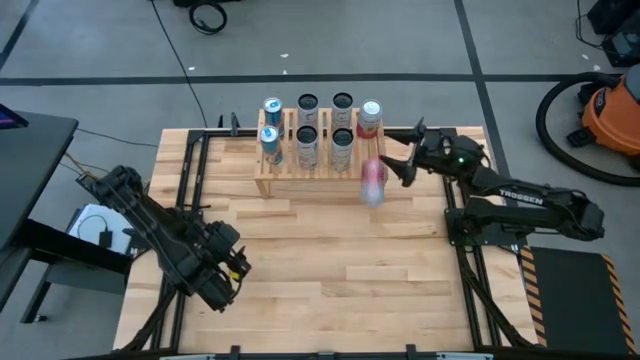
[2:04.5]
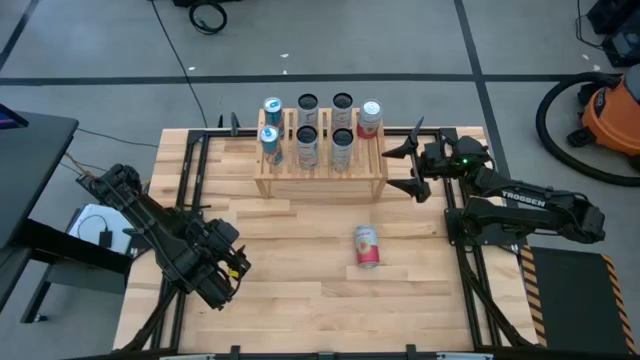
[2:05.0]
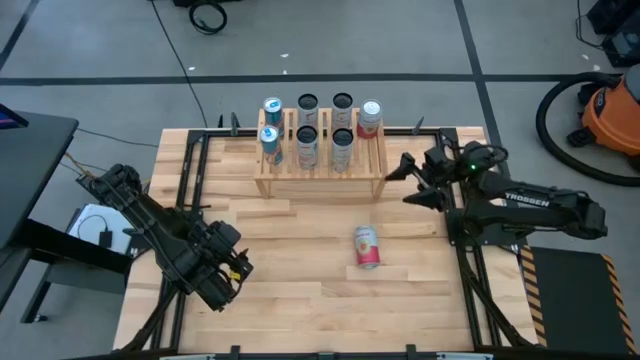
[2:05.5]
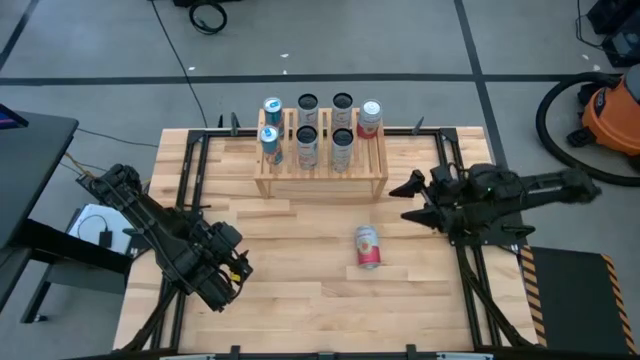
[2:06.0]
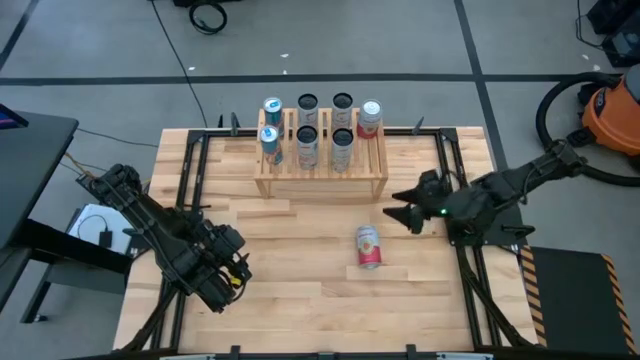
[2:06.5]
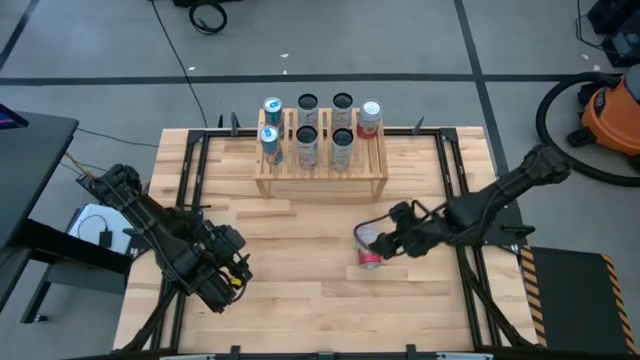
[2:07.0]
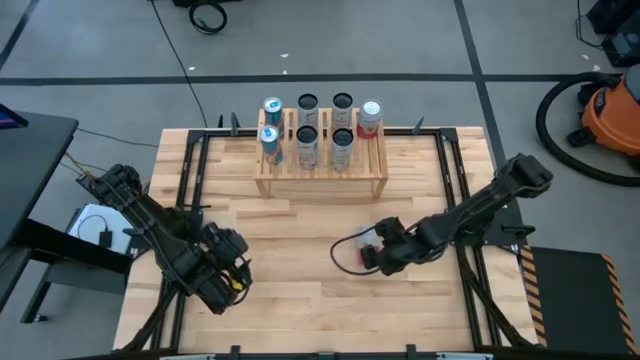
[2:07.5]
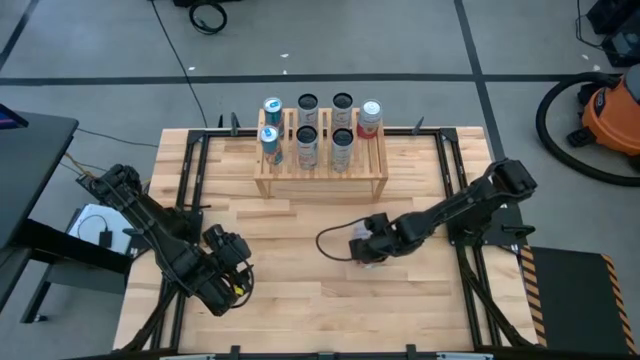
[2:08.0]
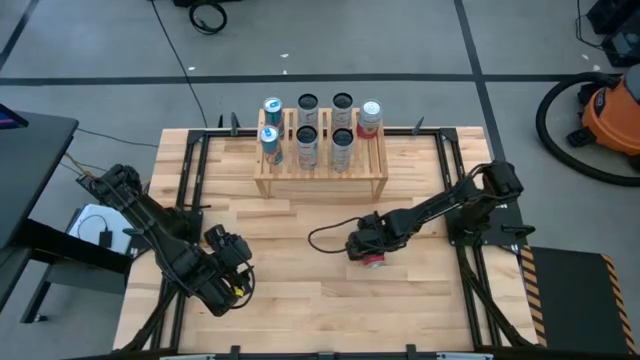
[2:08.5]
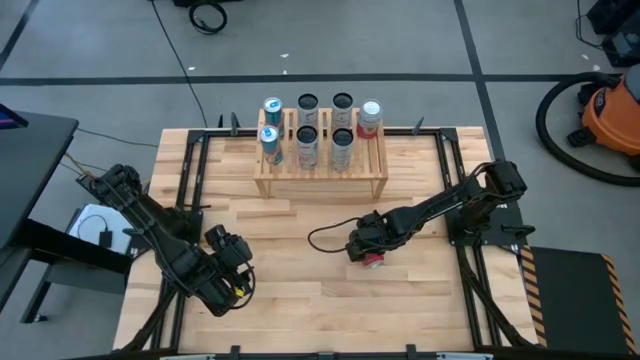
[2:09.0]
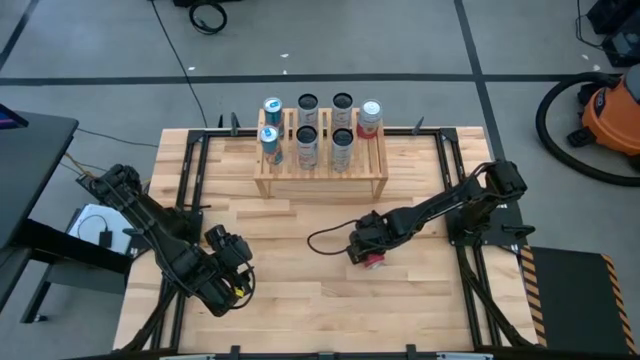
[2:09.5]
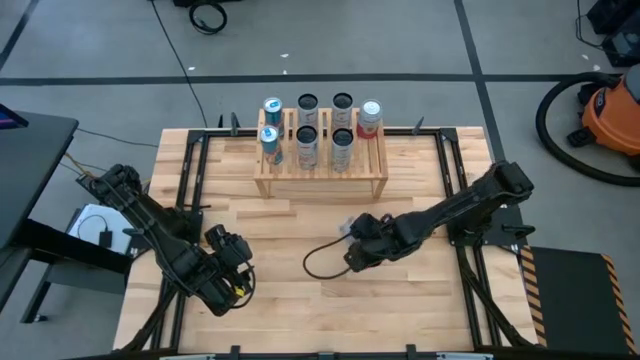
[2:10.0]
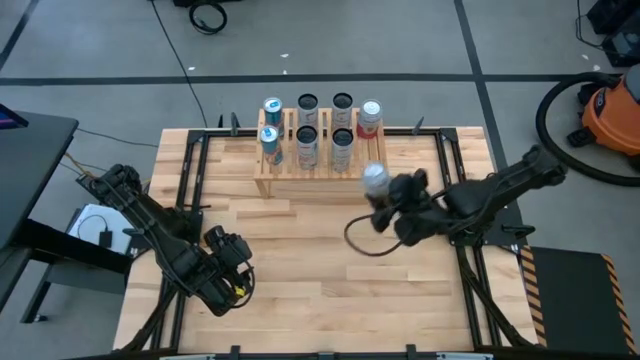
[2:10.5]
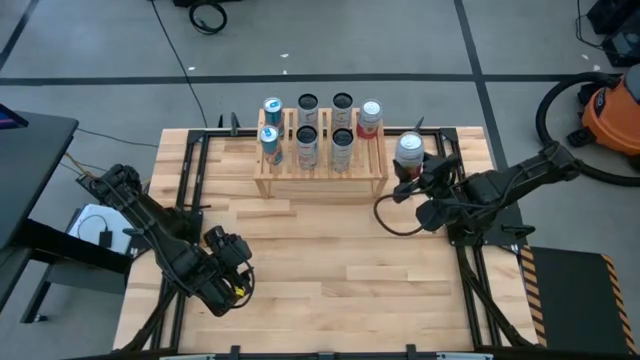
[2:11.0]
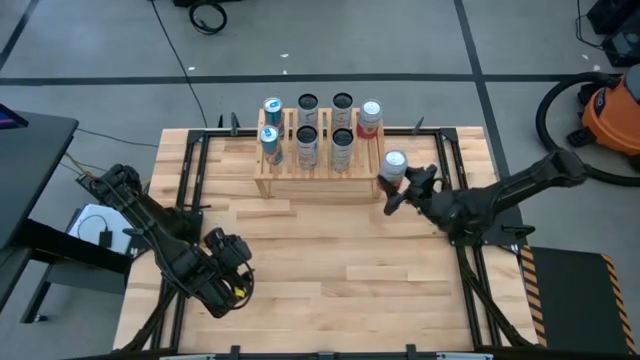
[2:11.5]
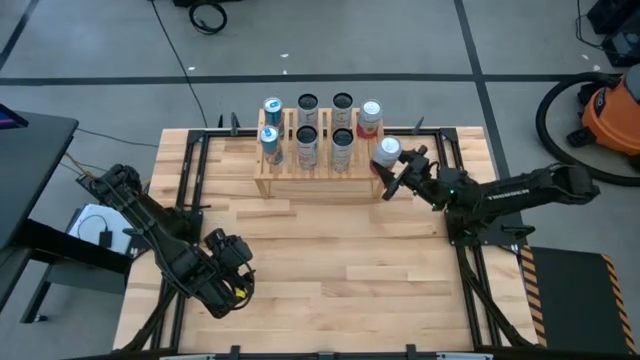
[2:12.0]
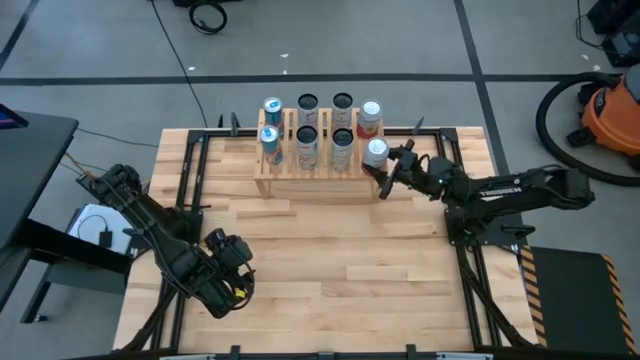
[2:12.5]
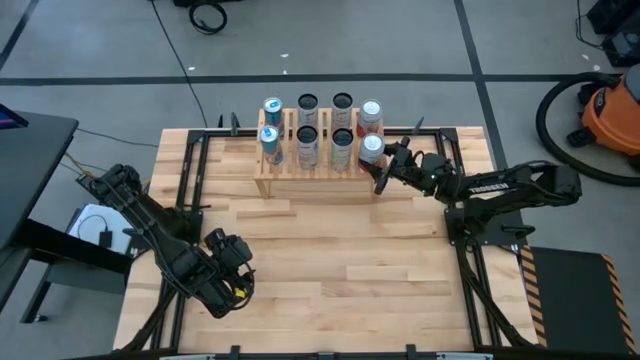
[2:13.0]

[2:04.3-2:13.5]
Task: Place canned beverage on shelf
Put the pink white soda can on the shelf aligned with the other pink white soda can

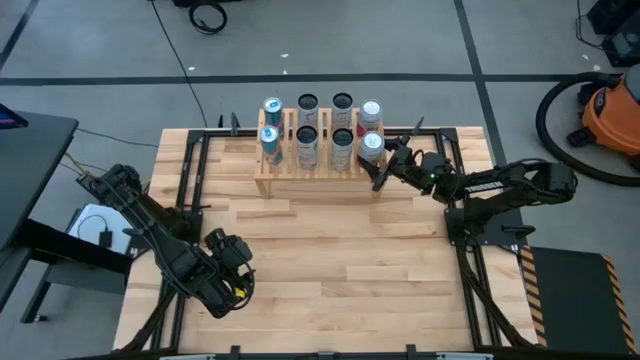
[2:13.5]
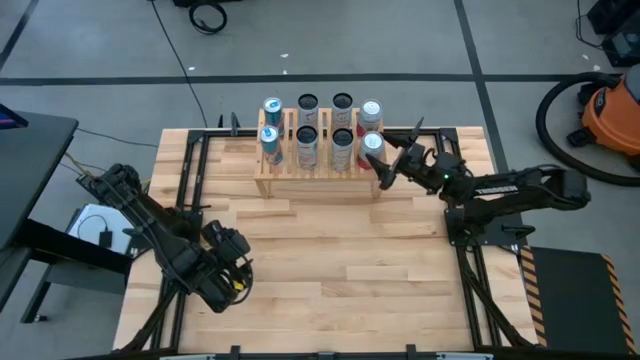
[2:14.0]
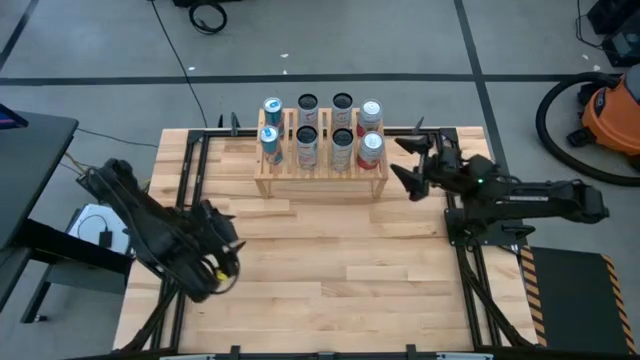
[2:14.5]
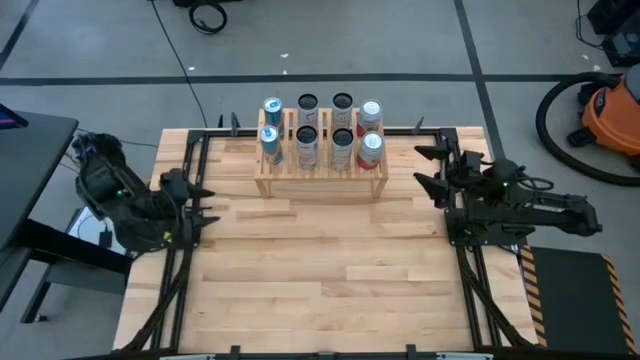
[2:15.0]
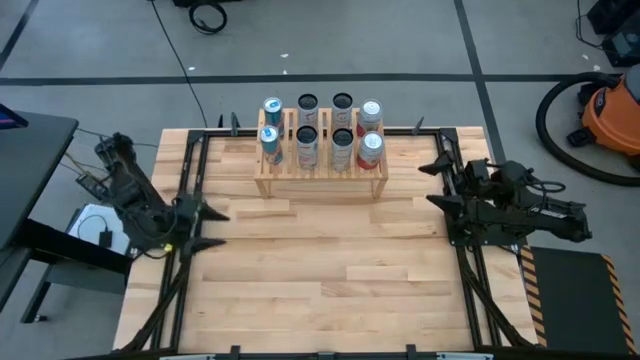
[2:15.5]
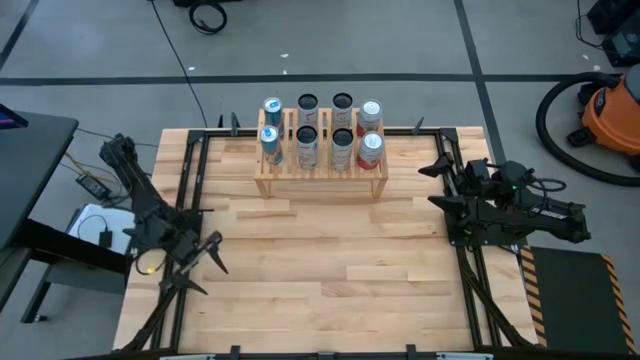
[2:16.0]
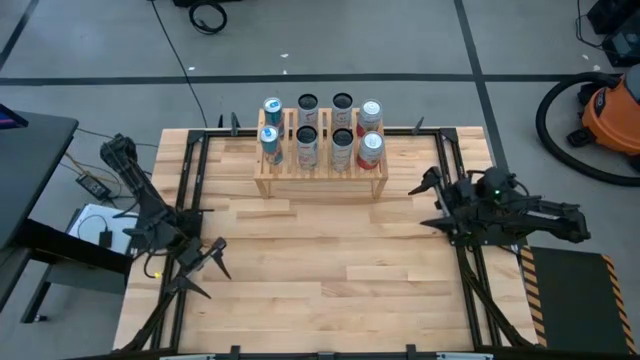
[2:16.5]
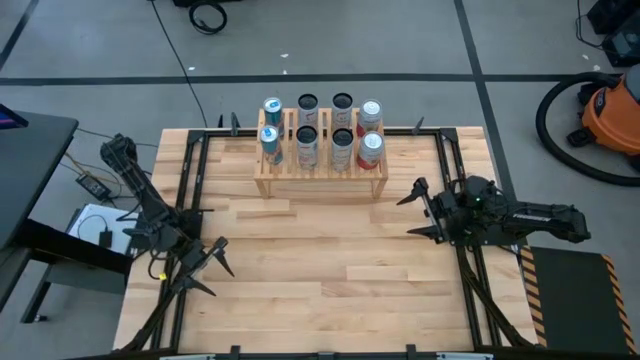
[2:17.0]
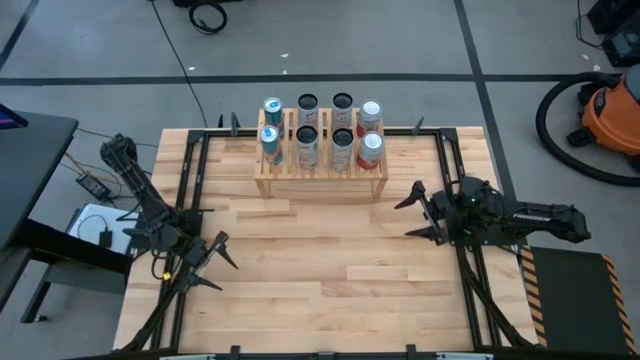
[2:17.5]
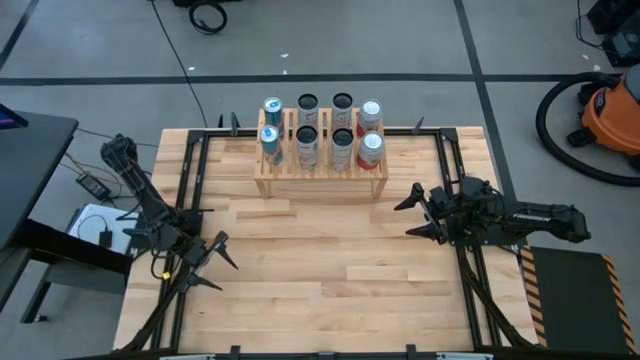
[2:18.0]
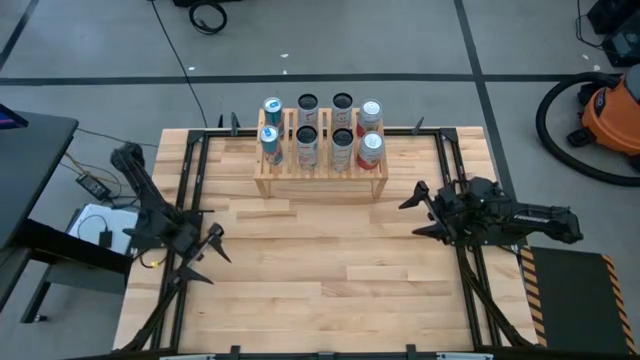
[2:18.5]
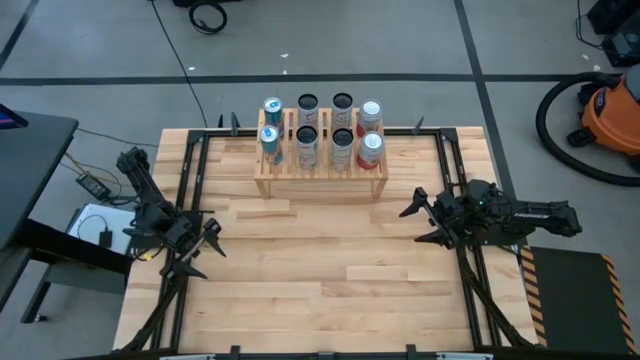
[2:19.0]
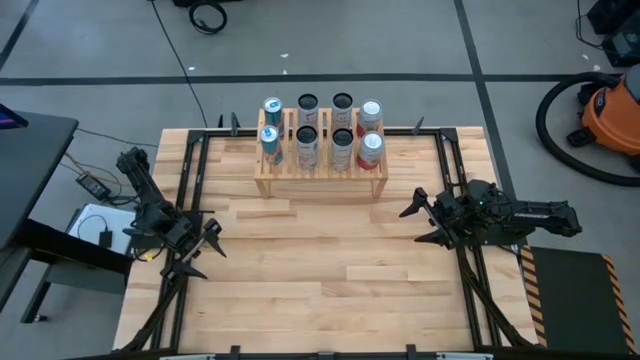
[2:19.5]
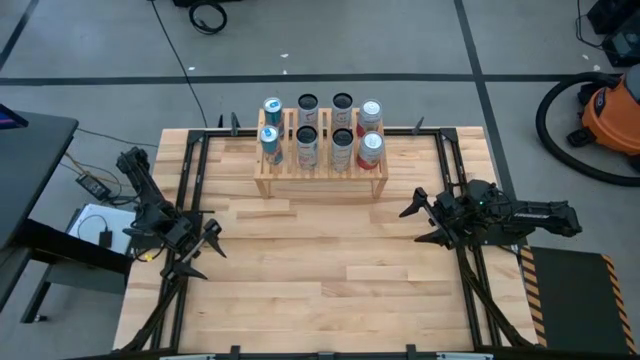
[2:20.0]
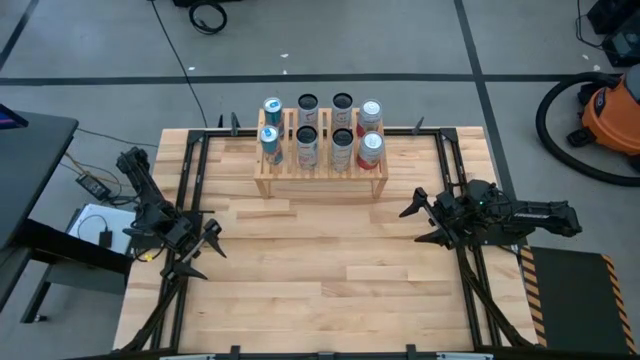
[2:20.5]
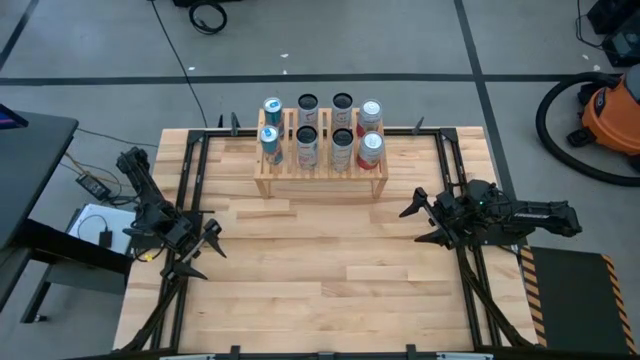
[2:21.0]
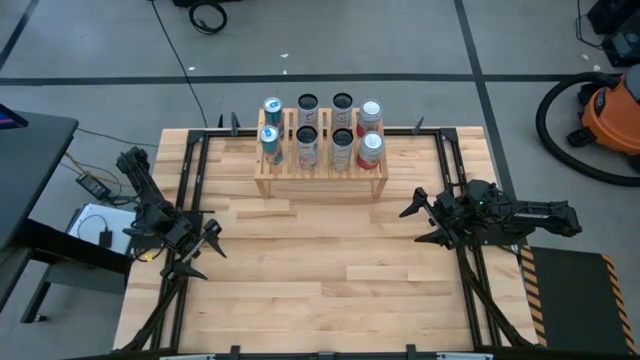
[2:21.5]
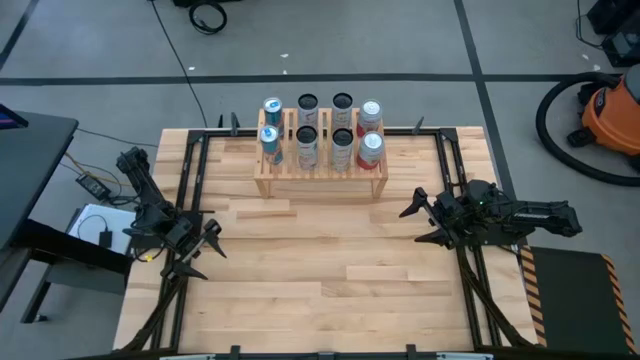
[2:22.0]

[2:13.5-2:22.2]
Return to Home Position

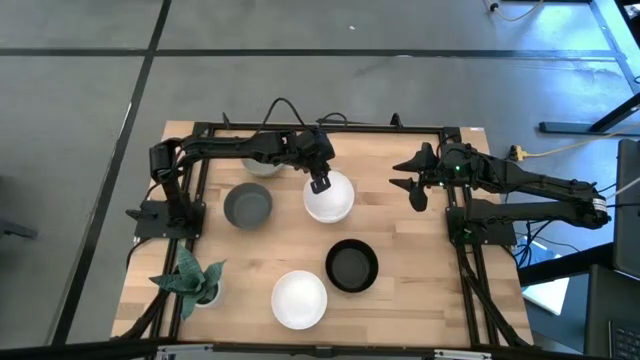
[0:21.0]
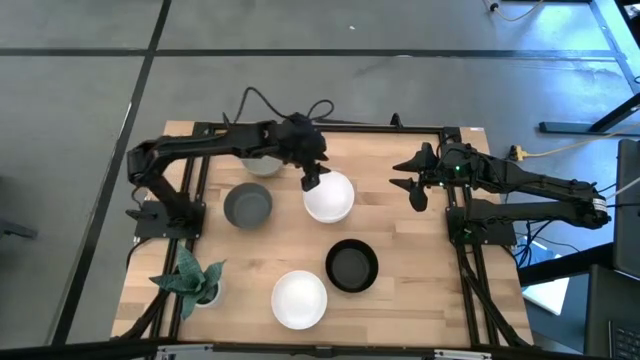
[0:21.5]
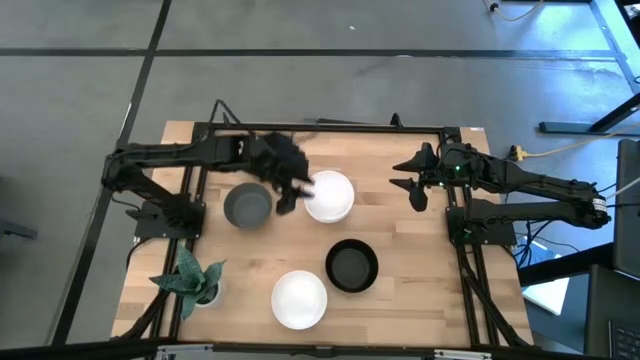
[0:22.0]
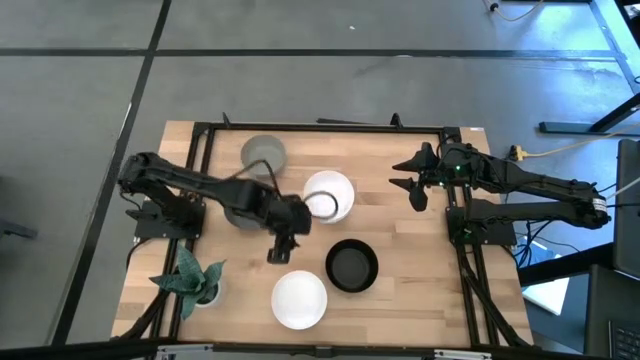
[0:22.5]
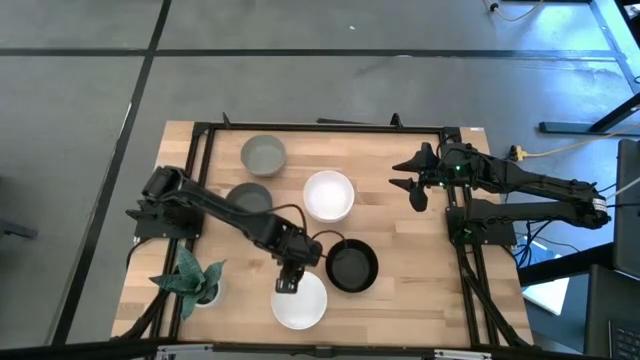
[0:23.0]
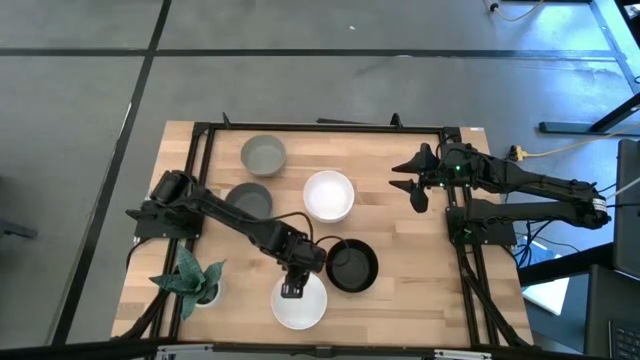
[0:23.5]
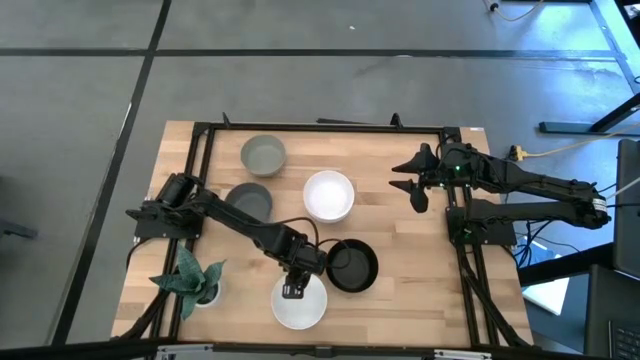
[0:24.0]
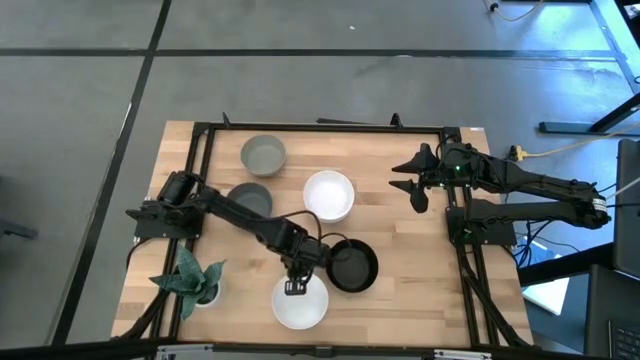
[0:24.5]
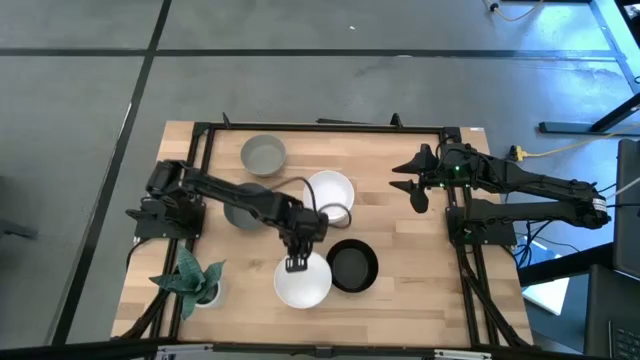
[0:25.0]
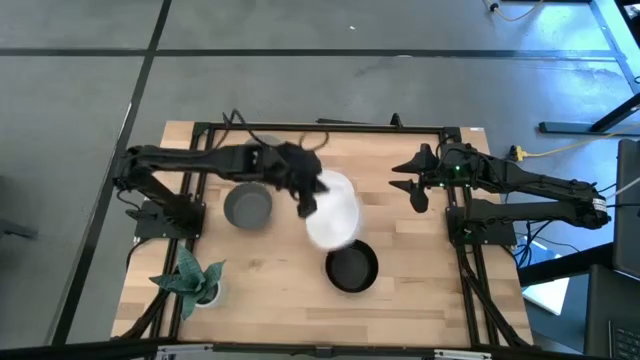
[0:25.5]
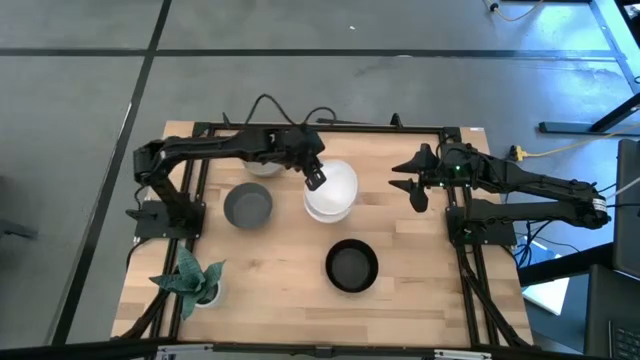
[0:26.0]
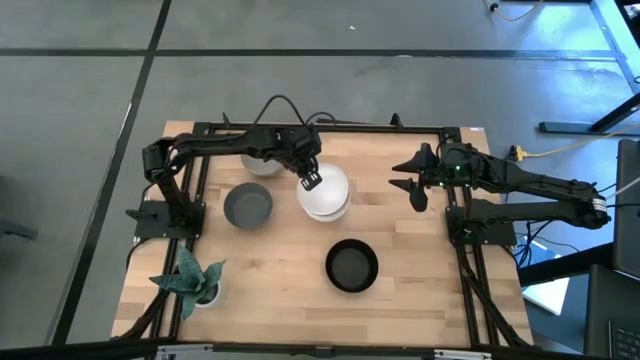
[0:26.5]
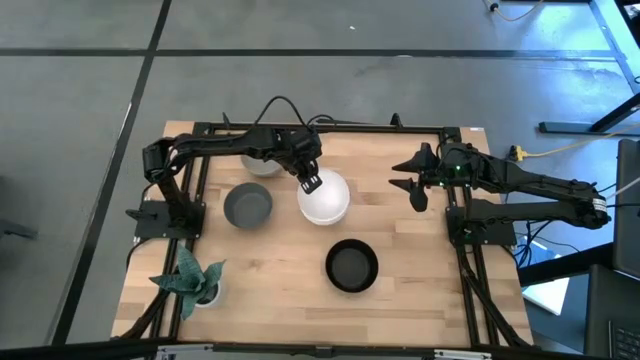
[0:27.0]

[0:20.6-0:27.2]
Task: Nest bowls inside each other
Stack the white bowl on top of the white bowl
